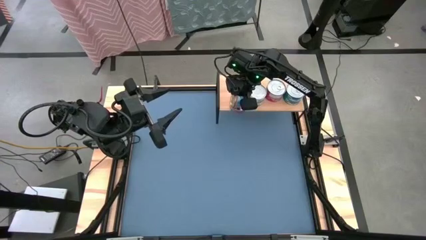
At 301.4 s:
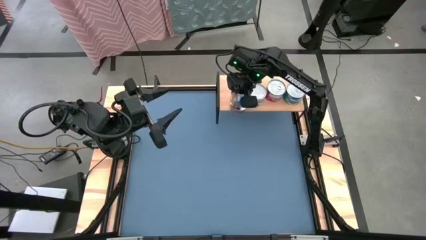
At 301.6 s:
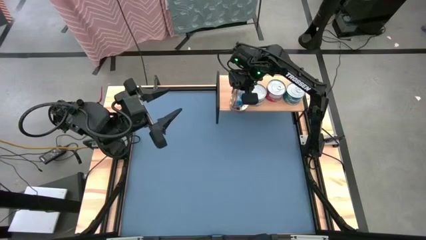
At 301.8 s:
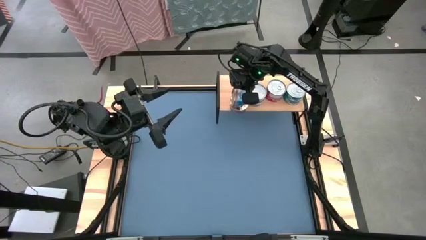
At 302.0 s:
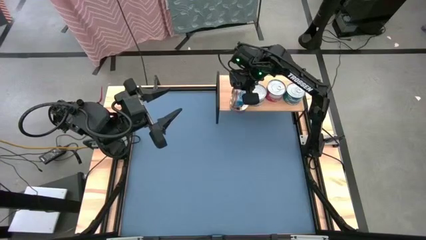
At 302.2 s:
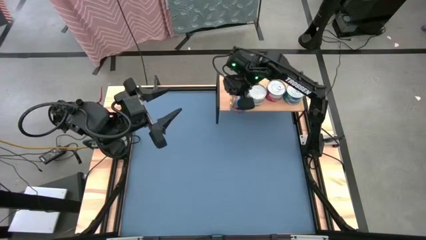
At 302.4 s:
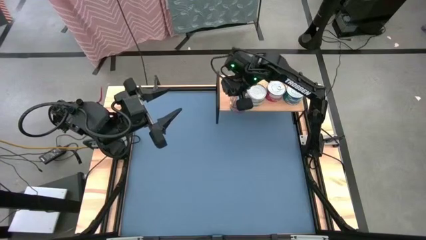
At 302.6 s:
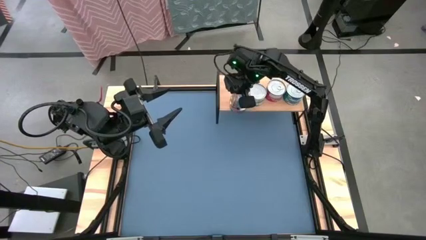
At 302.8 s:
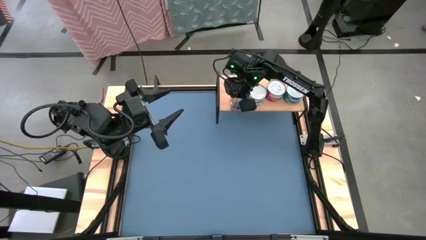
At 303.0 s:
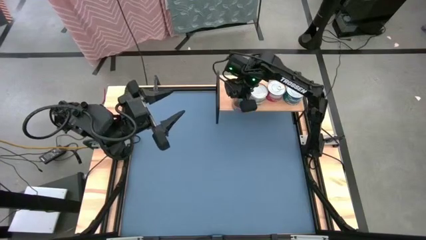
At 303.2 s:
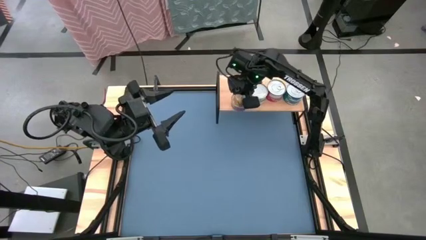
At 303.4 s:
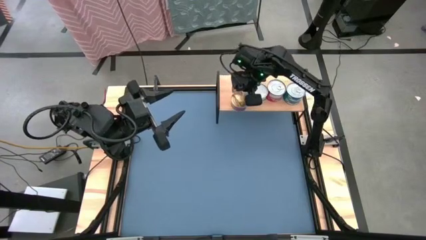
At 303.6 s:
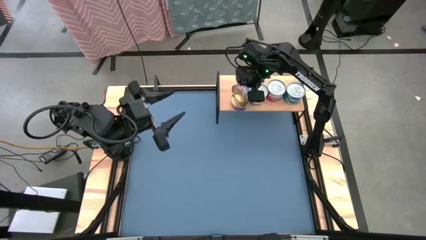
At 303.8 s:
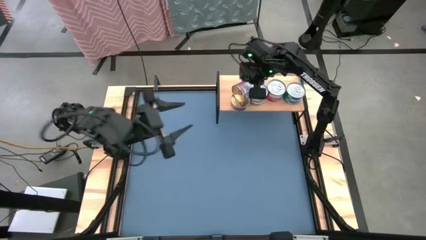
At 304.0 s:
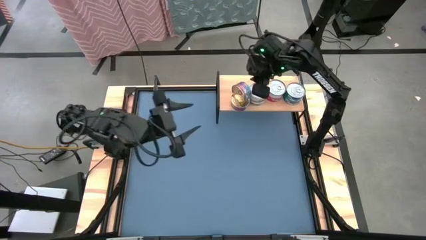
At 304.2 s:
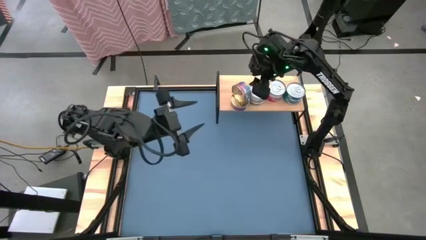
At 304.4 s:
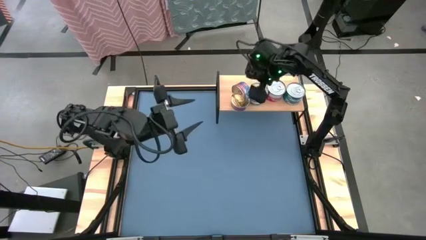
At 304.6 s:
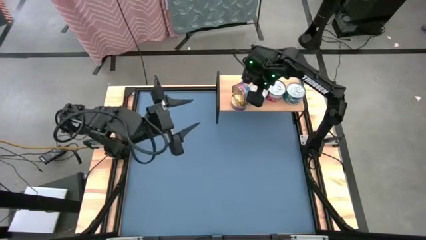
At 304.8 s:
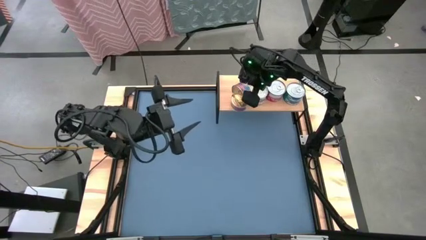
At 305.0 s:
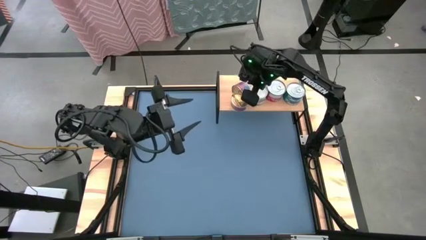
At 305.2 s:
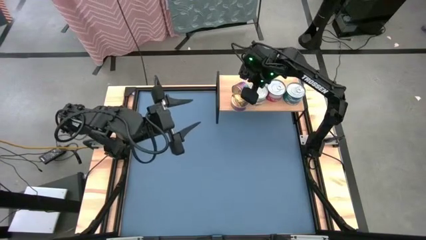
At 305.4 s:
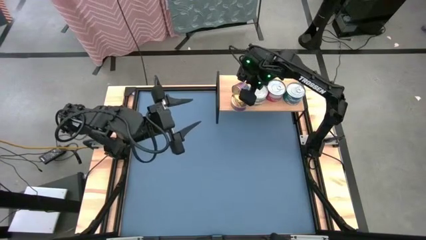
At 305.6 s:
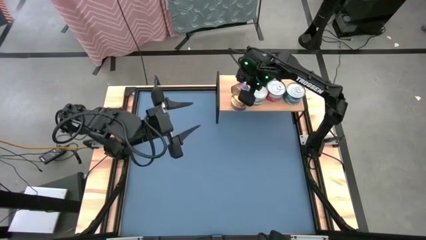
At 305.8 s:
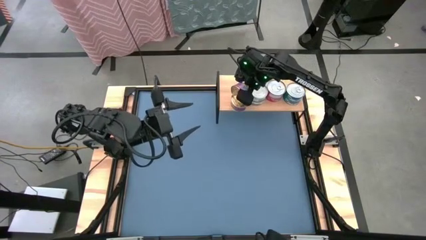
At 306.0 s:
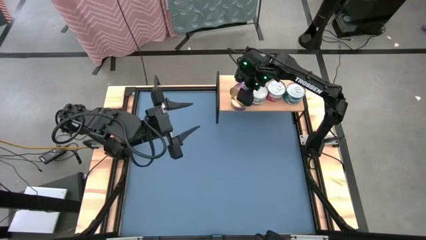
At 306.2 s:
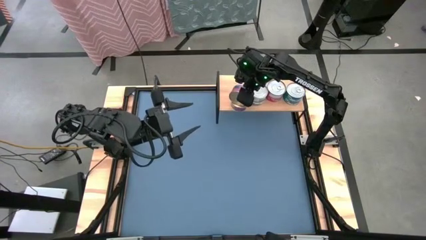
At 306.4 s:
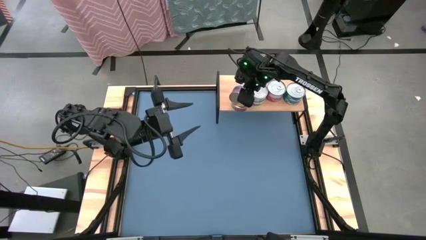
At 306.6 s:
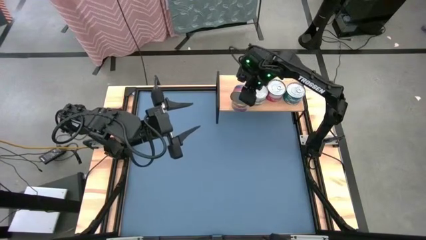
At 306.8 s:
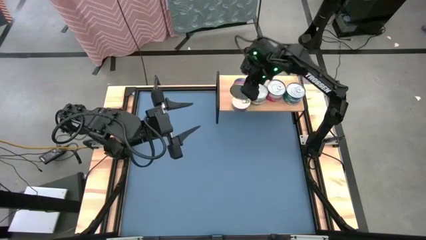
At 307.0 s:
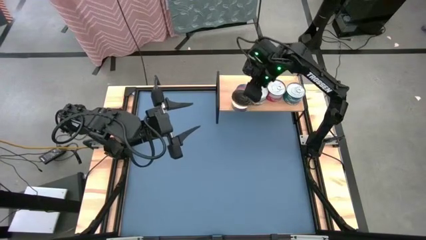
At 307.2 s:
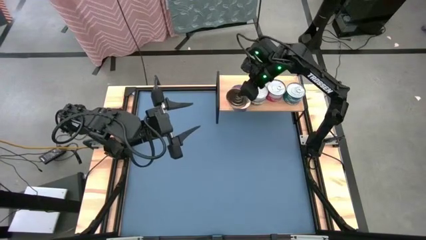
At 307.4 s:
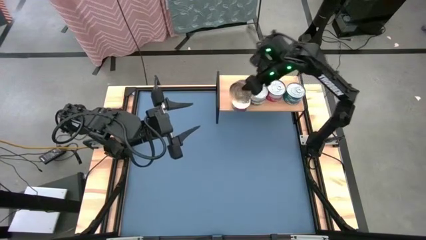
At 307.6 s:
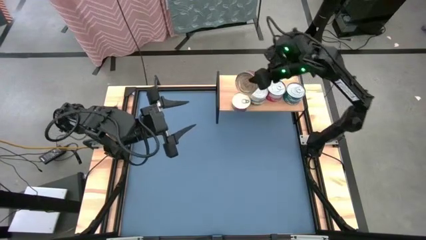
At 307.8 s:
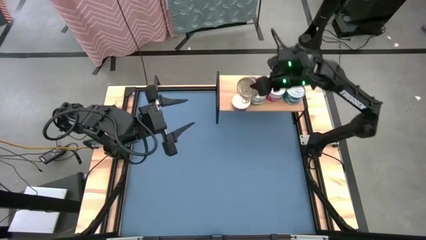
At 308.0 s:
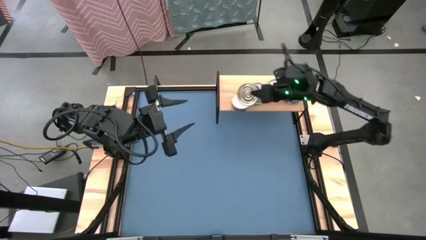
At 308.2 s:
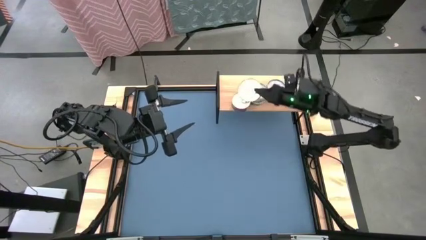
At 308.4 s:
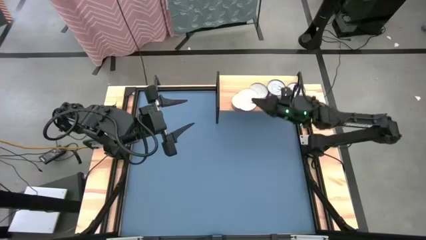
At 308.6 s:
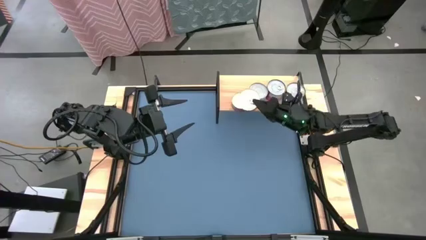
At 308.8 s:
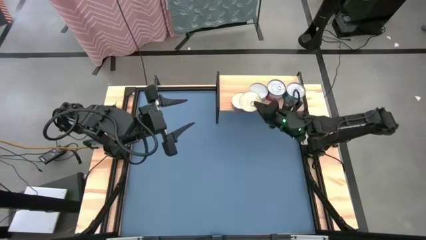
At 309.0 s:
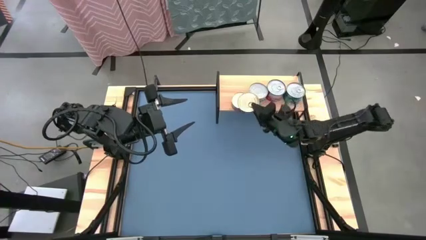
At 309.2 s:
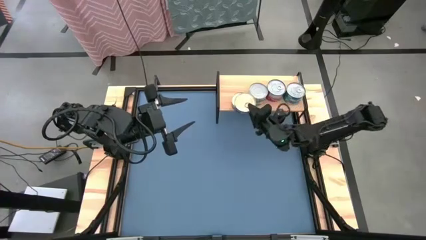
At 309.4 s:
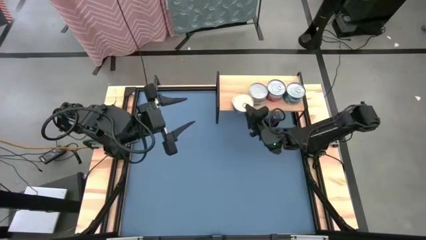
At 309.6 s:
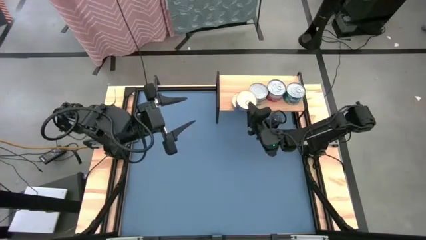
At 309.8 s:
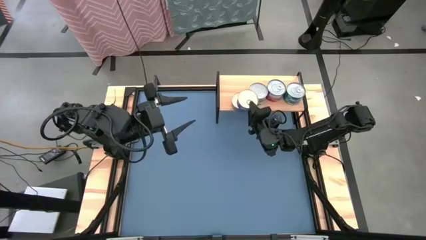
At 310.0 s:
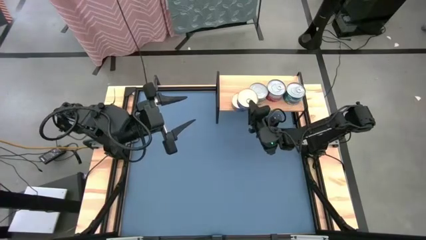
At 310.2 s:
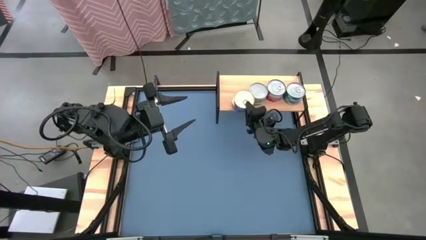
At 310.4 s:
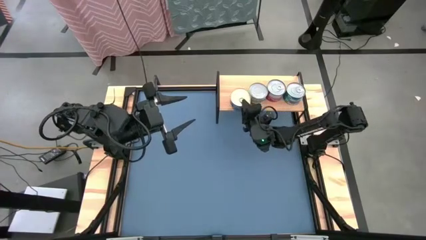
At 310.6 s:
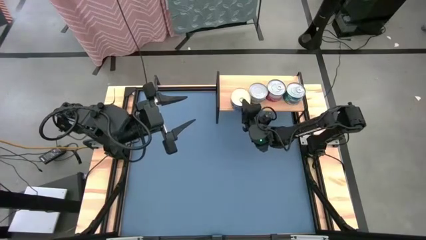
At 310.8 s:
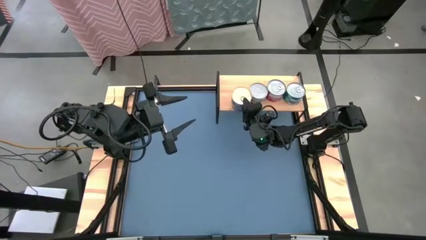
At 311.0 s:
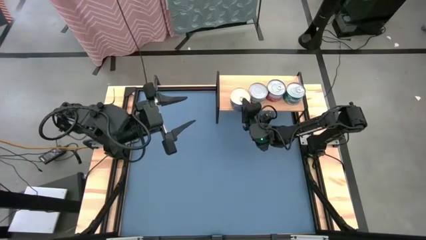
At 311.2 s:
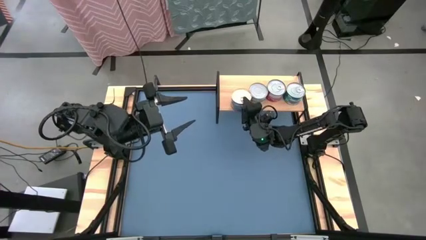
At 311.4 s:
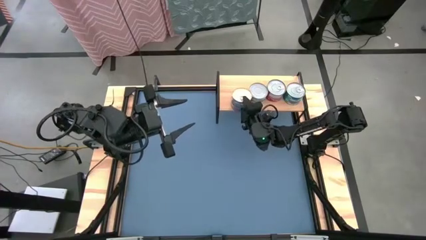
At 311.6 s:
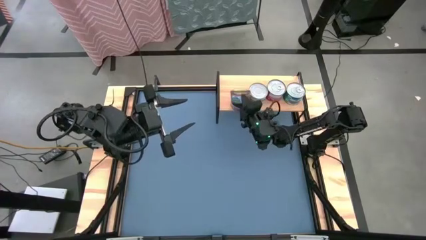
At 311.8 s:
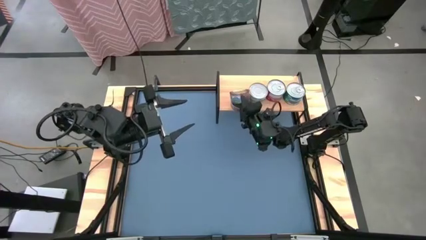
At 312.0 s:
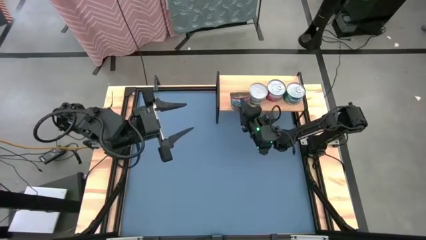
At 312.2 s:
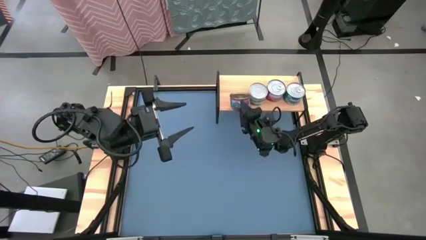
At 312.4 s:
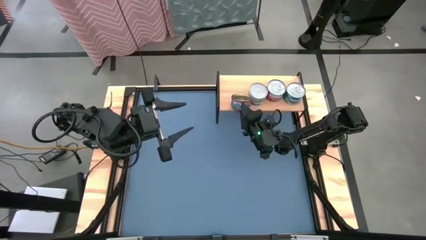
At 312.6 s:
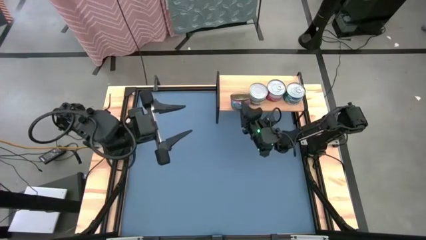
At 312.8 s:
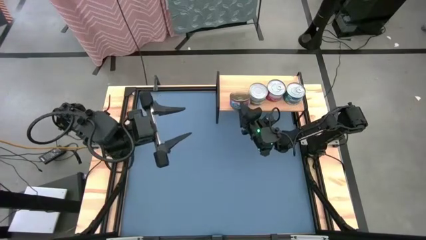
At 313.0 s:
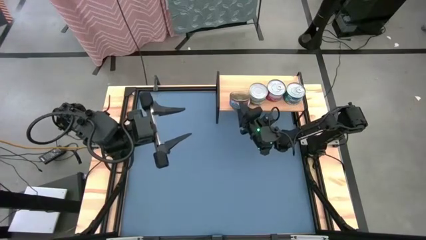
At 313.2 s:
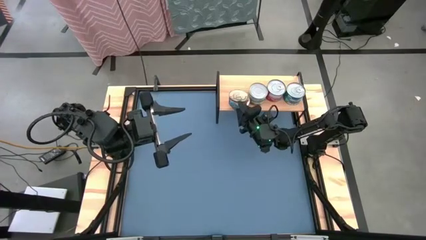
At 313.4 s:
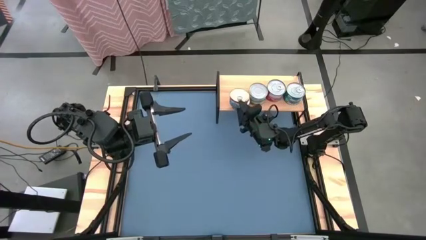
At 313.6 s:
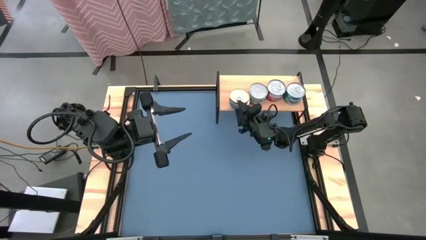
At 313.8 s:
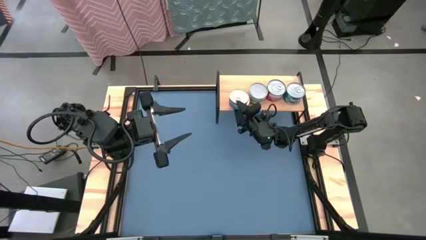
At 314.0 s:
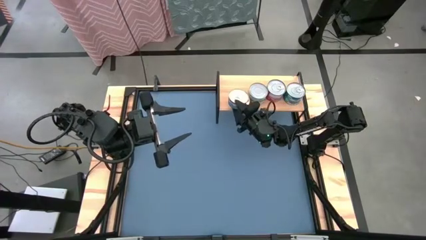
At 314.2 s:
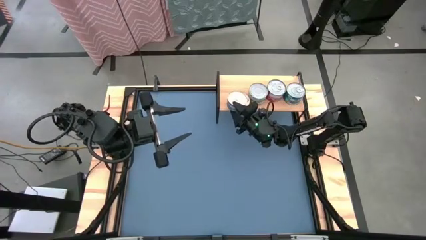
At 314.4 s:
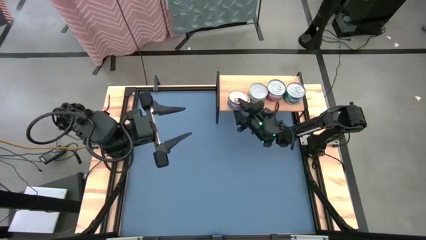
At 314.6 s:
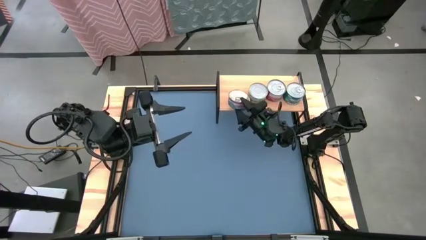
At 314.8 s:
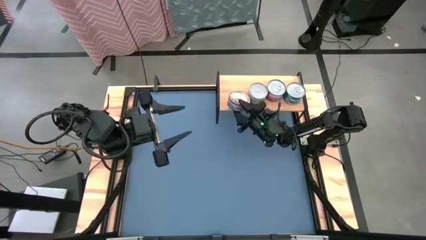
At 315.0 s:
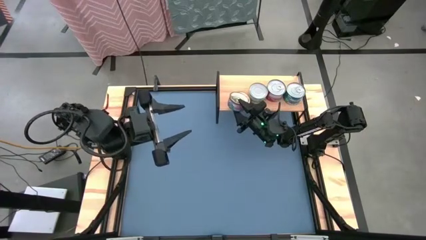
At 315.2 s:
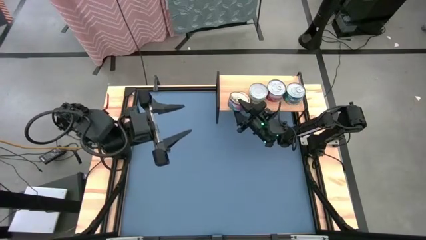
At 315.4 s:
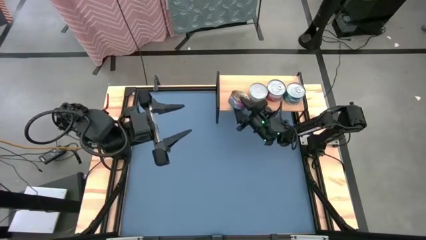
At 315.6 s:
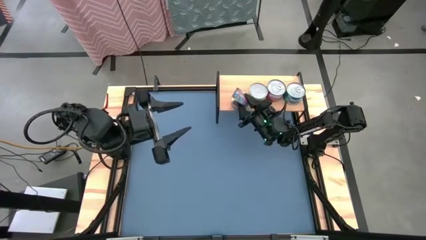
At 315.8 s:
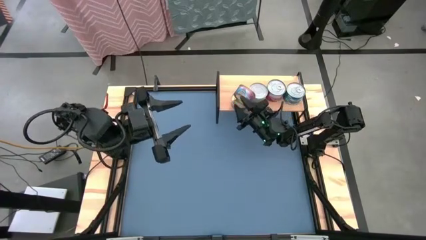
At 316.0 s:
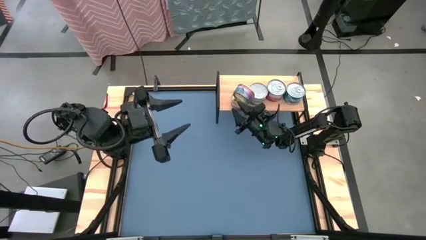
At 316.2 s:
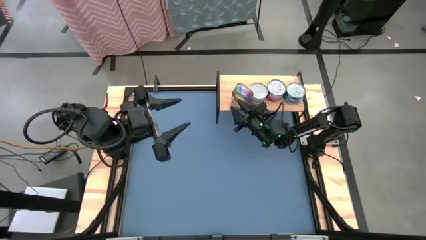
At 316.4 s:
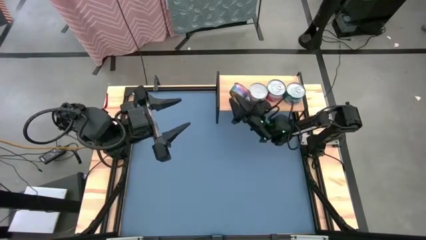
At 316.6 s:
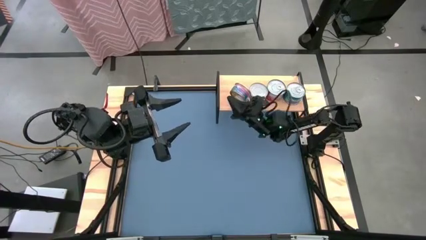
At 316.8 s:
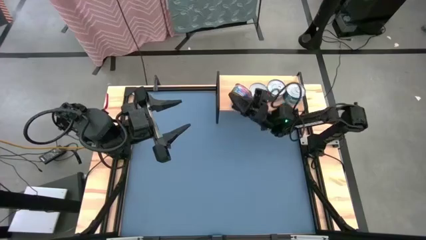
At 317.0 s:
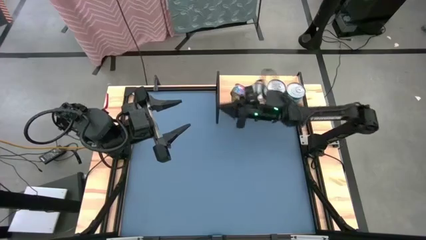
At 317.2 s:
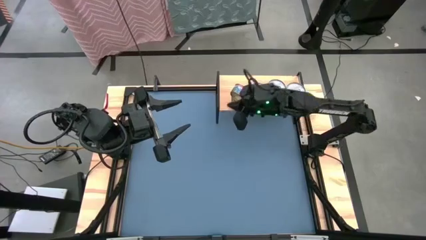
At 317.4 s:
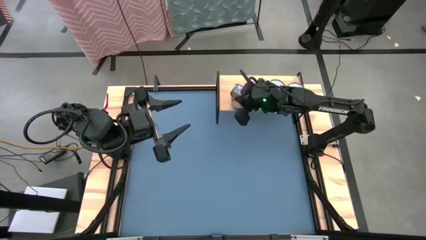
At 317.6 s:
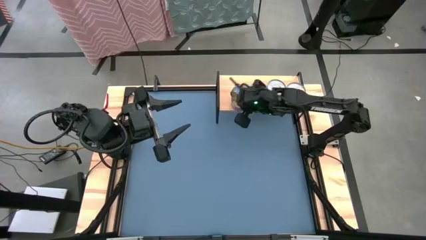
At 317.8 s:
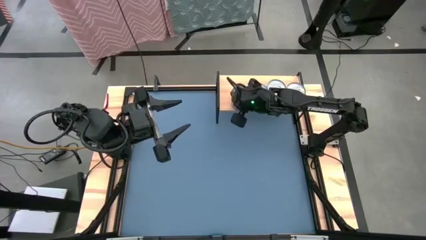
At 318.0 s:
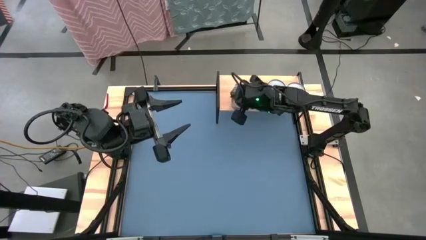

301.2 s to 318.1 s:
Task: Stack canned seafood by type on shelf
Stack the blue-pink tuna can on top of the blue-pink tuna can on the shelf
